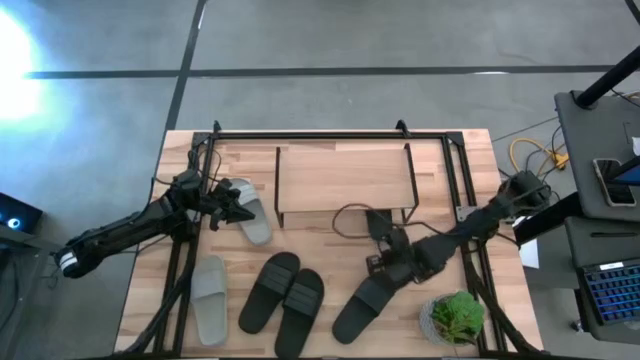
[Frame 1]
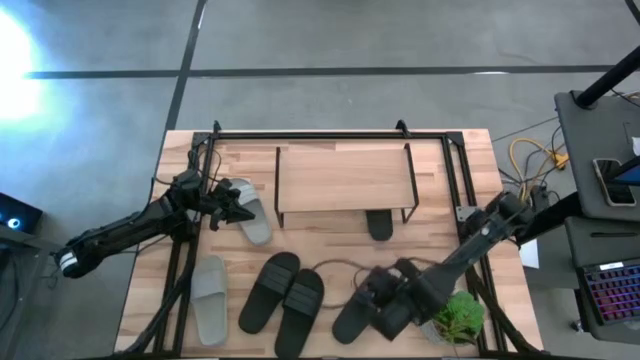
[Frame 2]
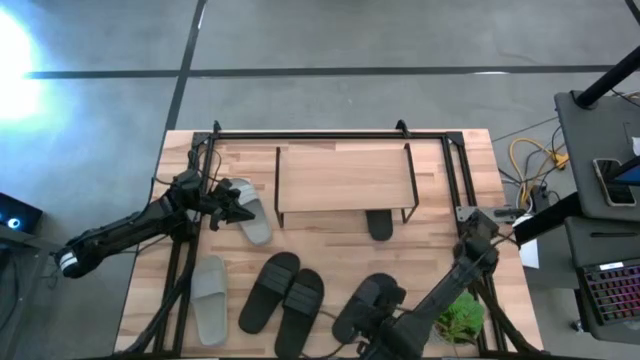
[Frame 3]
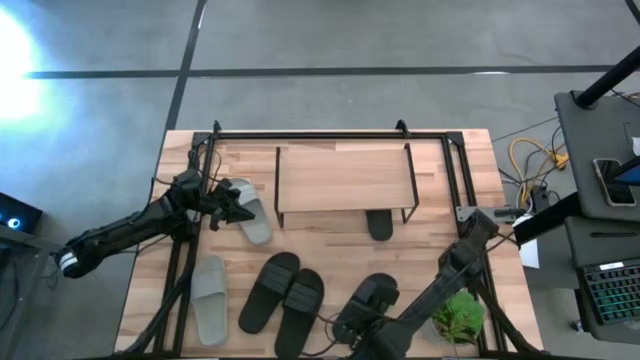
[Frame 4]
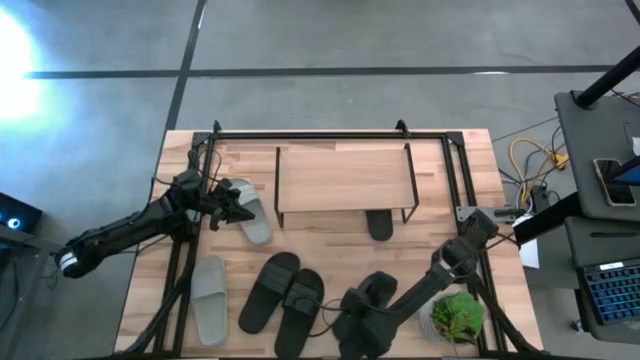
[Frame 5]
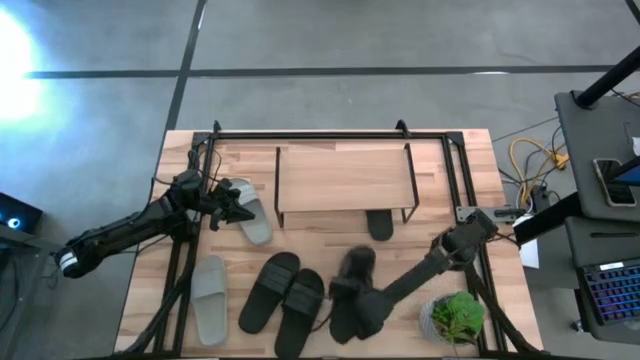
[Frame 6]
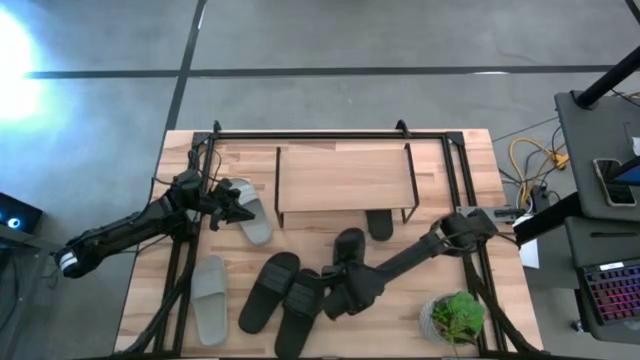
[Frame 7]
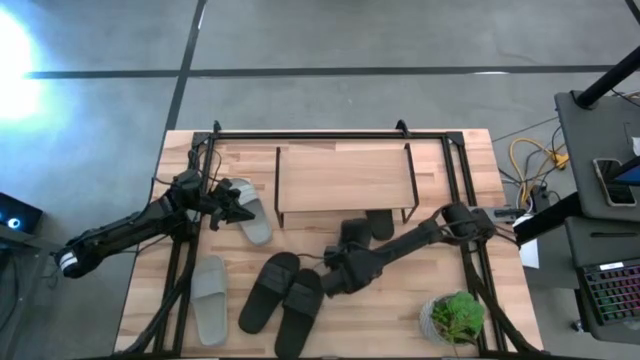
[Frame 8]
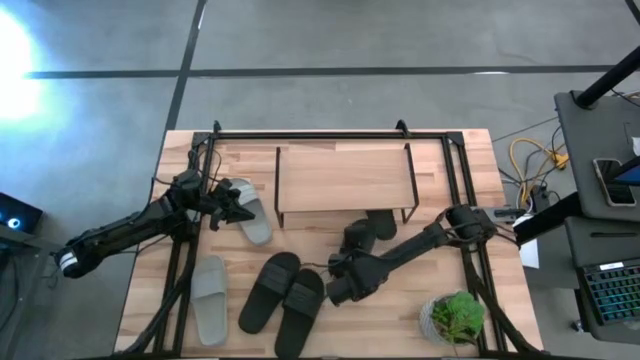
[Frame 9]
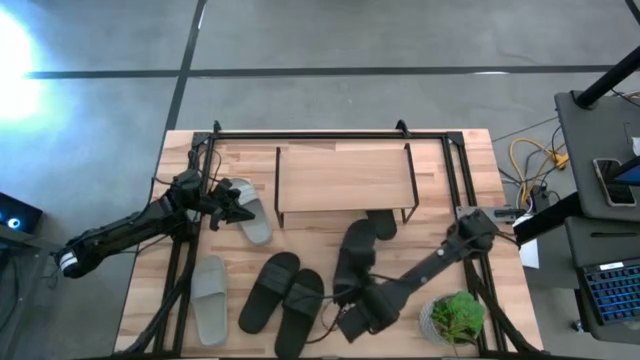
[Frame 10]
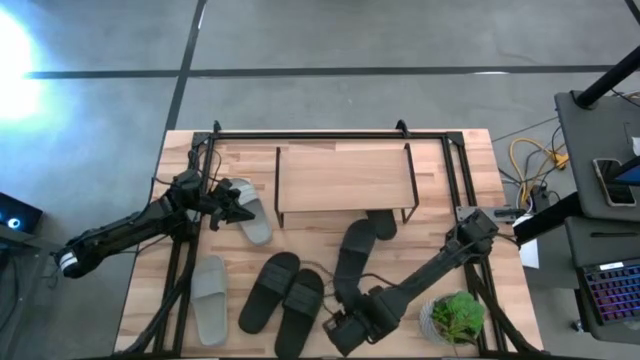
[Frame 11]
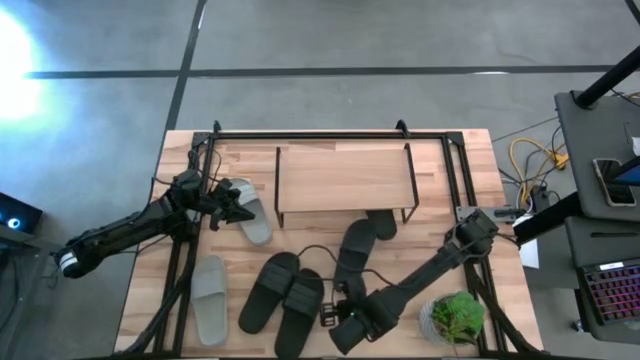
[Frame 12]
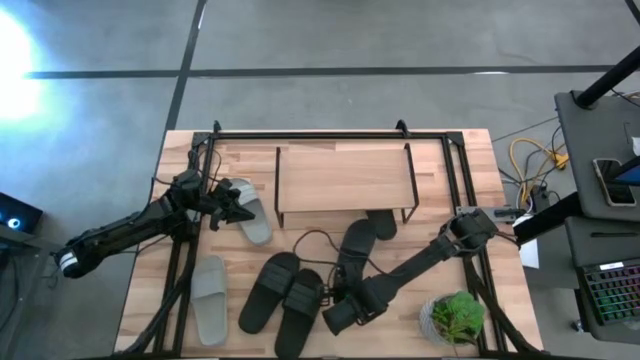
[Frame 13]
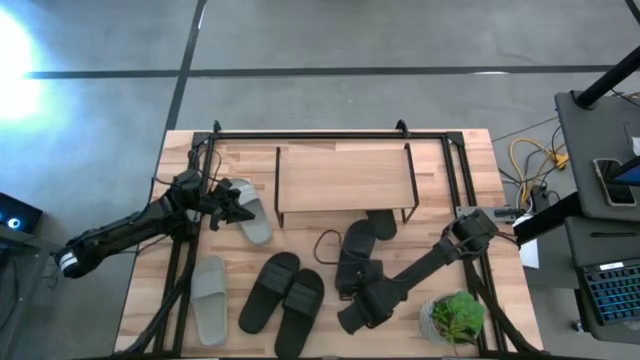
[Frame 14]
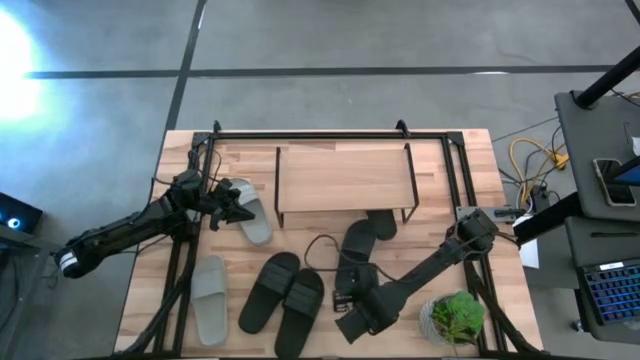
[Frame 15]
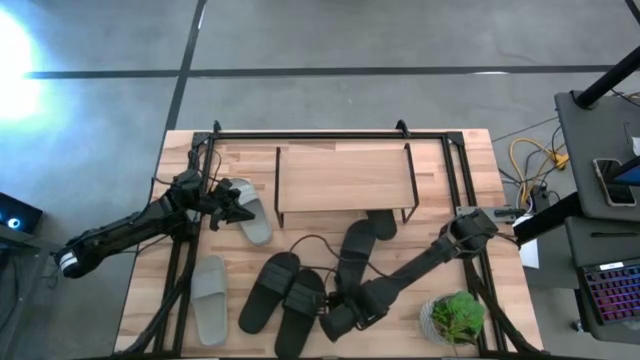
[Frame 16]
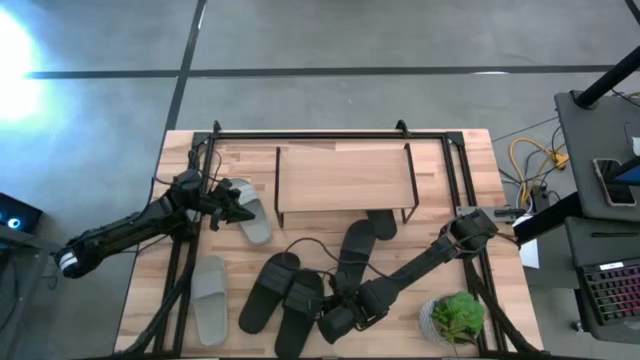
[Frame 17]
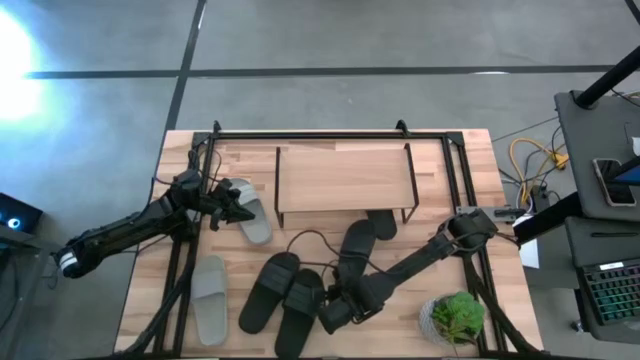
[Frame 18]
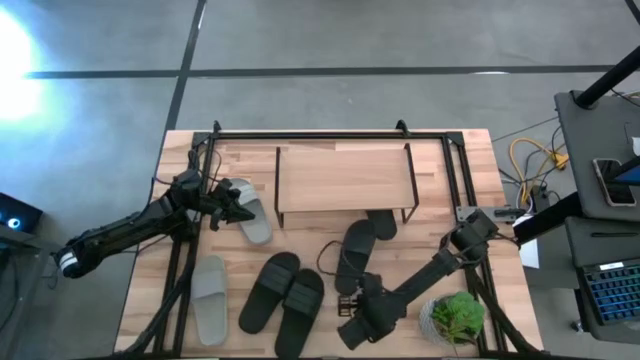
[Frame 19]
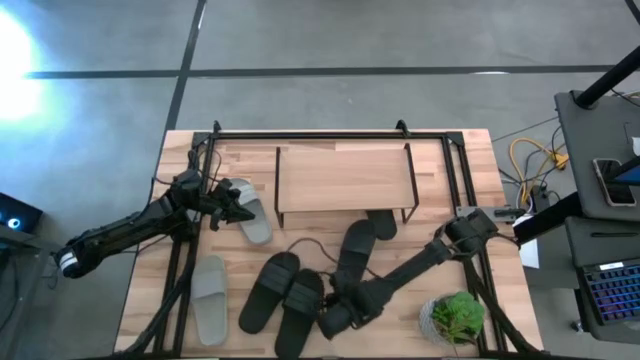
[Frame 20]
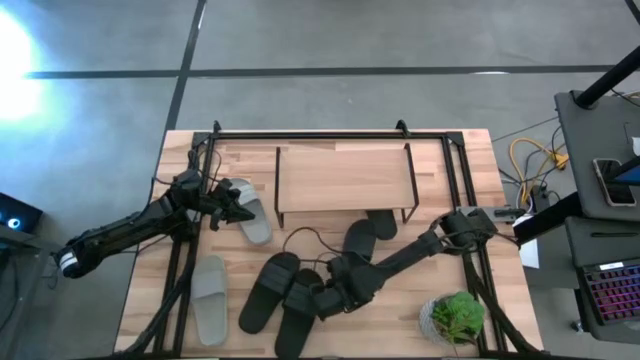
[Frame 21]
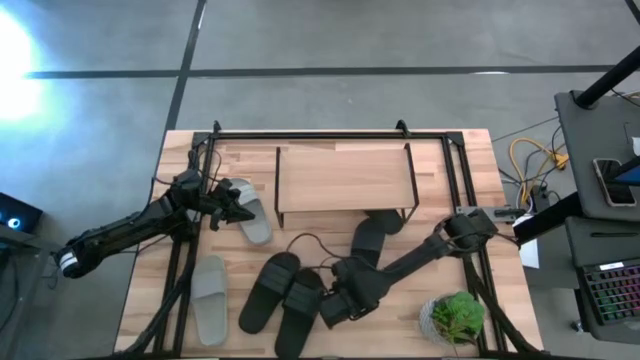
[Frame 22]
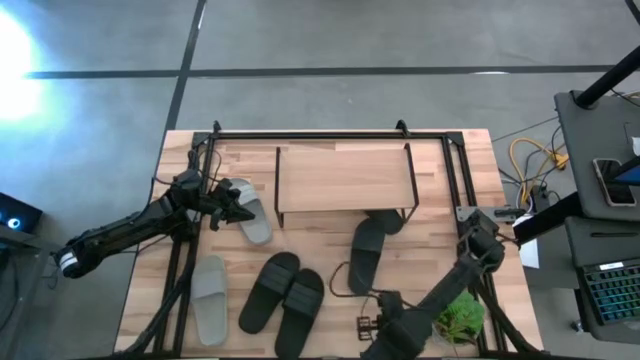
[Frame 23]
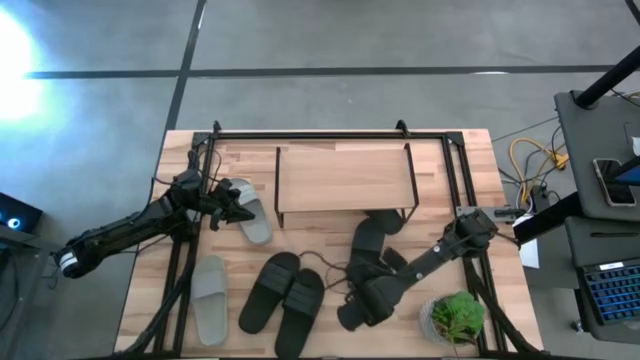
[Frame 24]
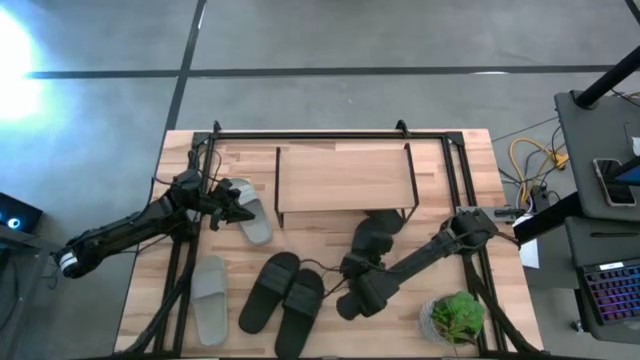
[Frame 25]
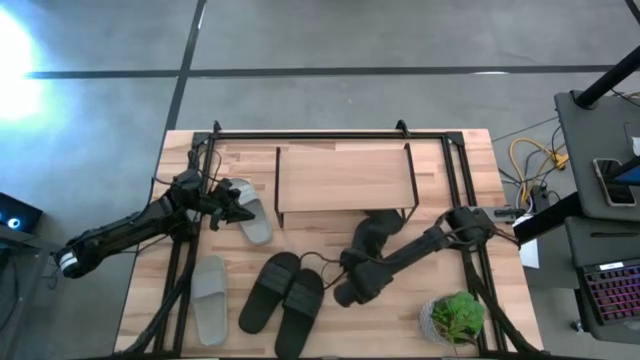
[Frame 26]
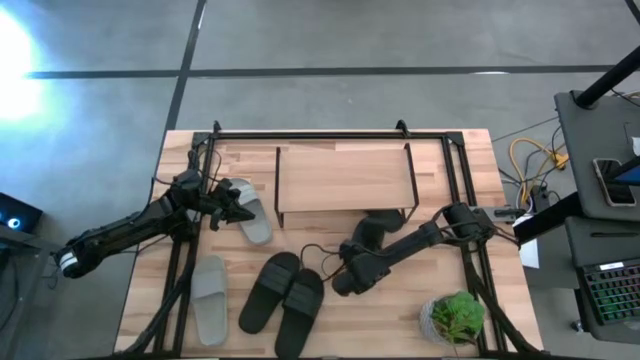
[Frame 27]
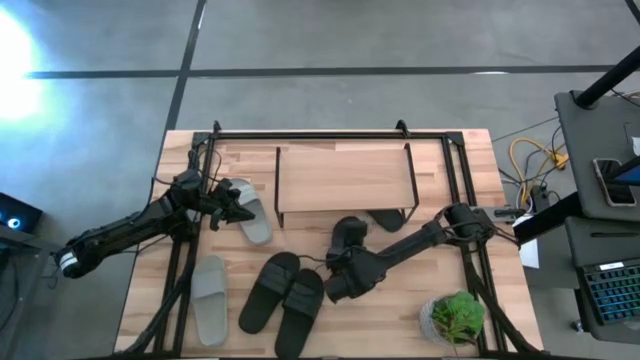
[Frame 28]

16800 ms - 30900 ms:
Task: Pick and place slides into the shelf
Put the black slipper under the shelf

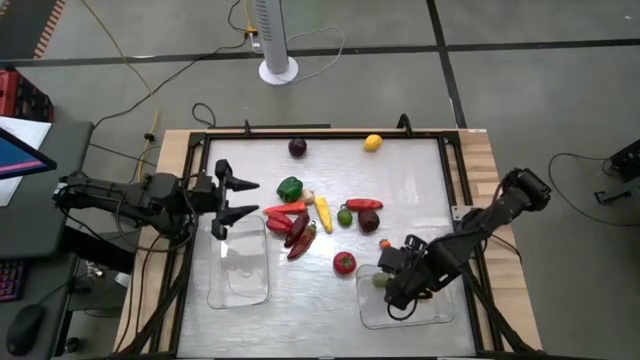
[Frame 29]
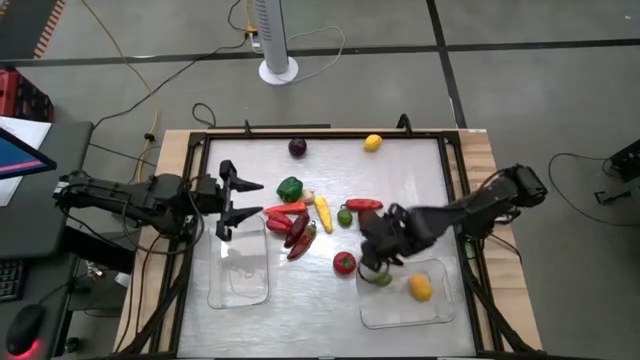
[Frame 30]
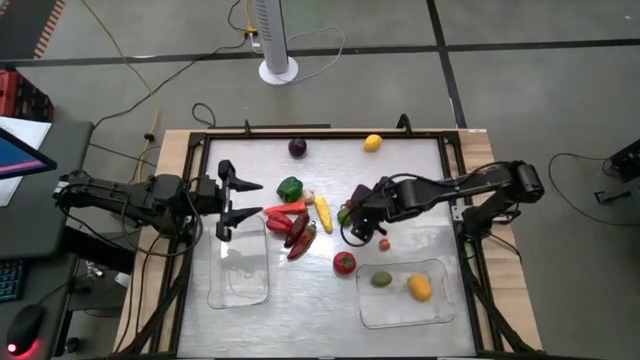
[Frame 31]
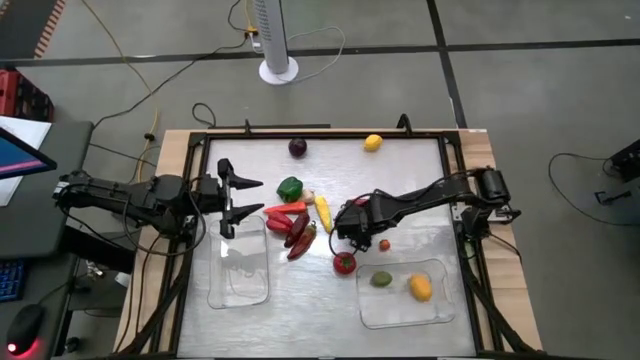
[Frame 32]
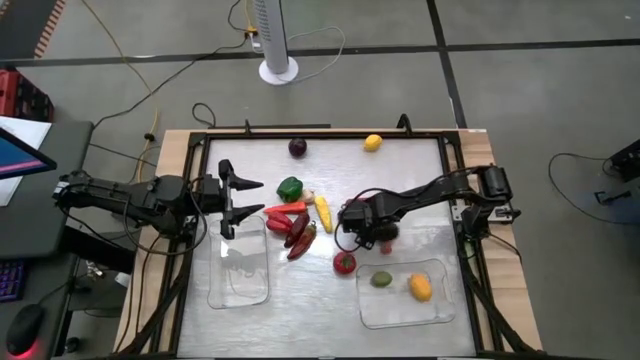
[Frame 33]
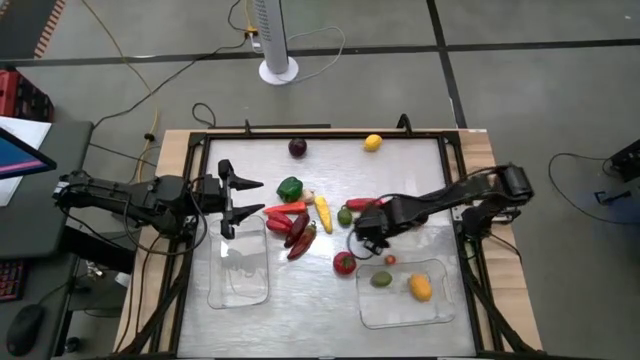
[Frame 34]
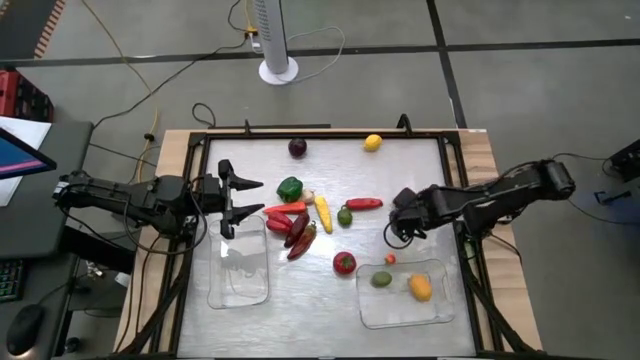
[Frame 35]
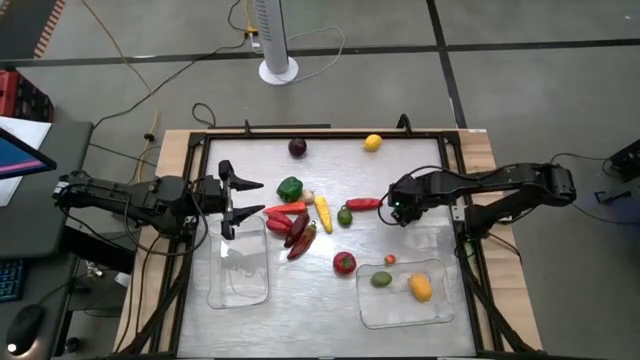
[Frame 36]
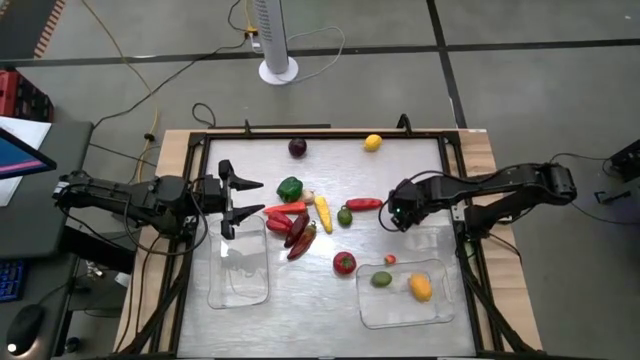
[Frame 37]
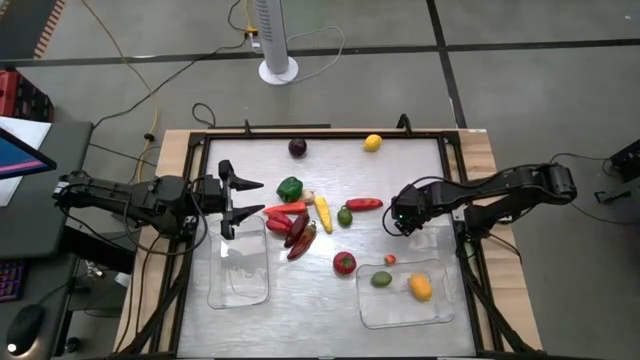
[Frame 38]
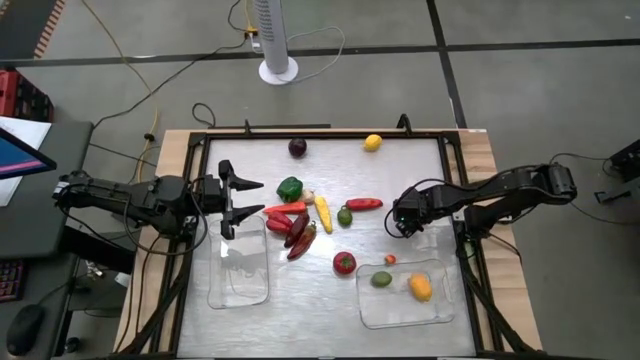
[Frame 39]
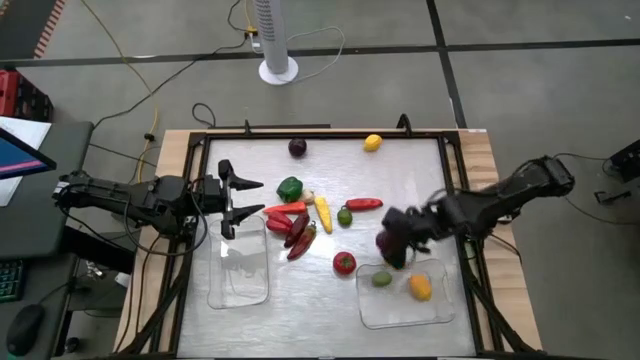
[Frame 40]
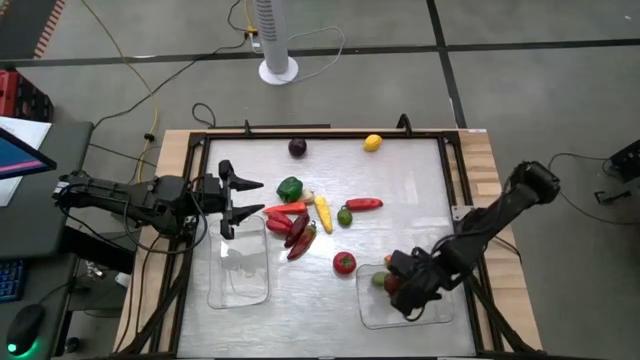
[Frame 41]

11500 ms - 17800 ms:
Task: Sort produce into baskets
Put the apple into the right transparent bin

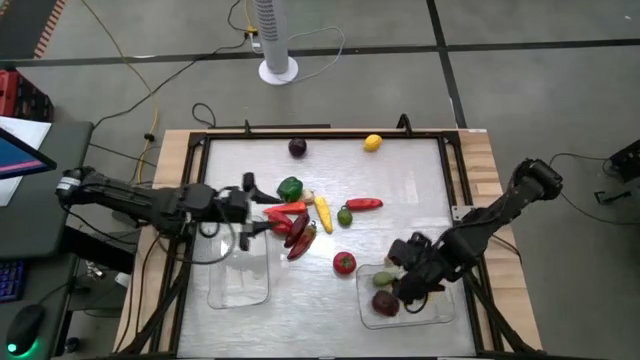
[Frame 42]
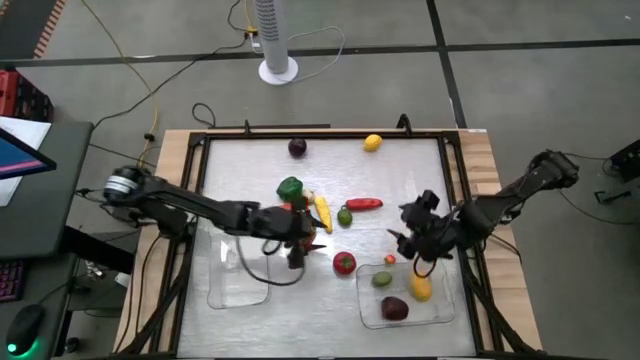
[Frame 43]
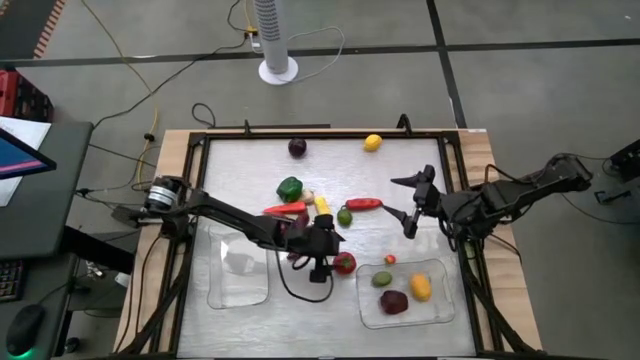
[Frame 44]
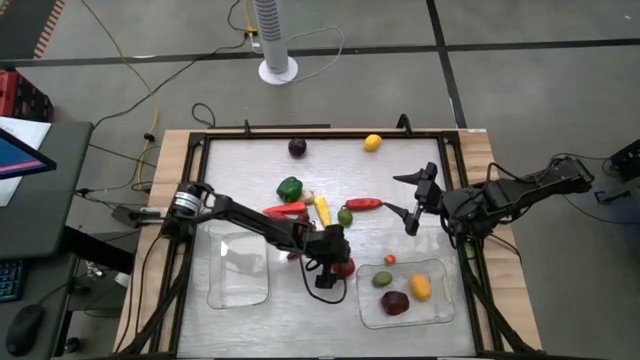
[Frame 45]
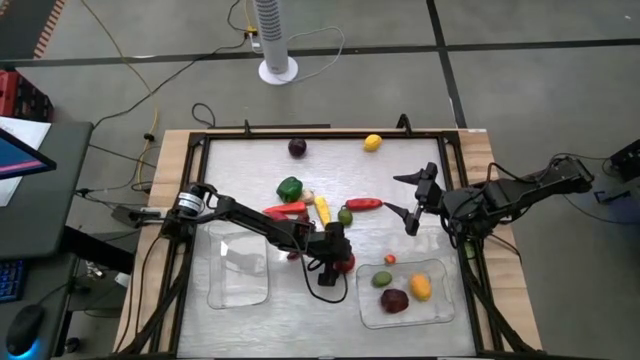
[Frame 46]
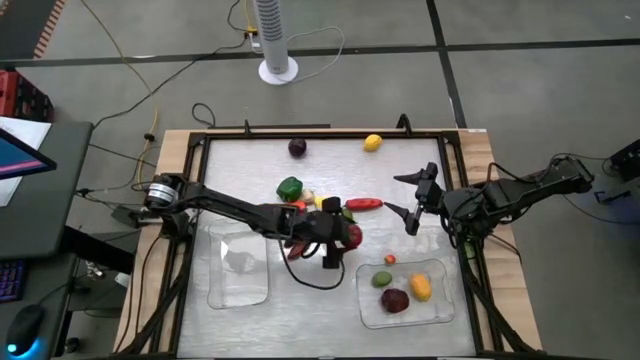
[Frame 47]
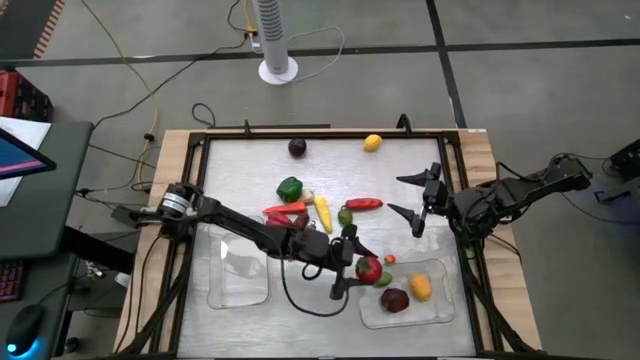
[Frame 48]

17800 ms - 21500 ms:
Put the tomato into the right transparent bin
